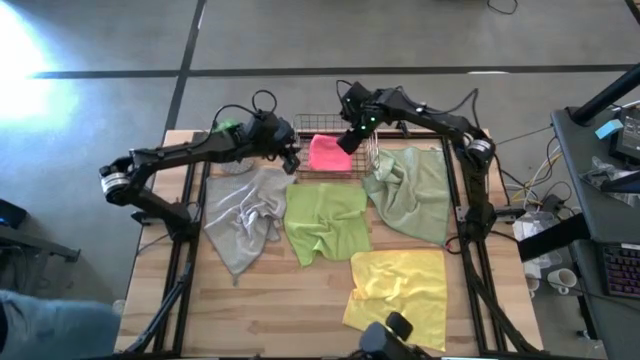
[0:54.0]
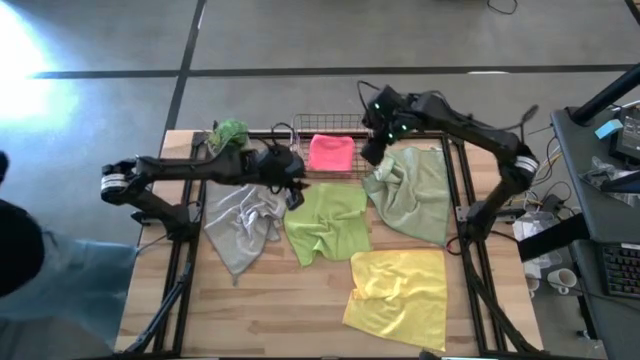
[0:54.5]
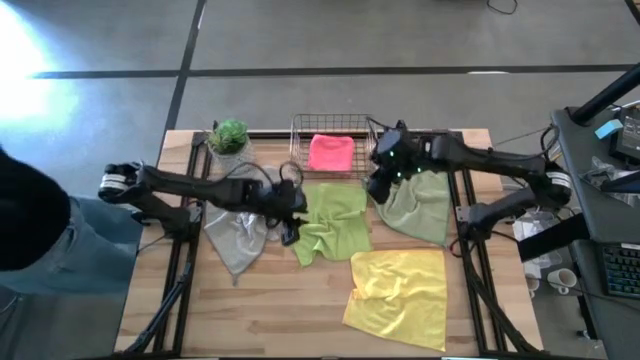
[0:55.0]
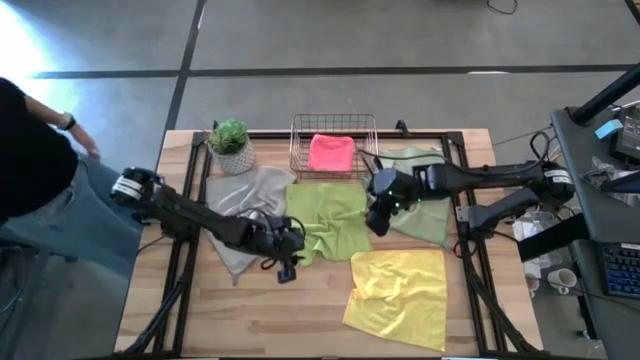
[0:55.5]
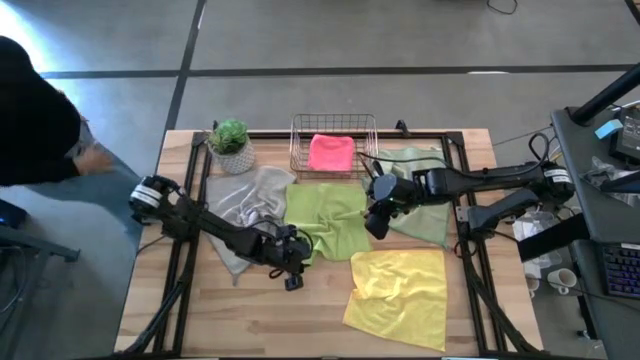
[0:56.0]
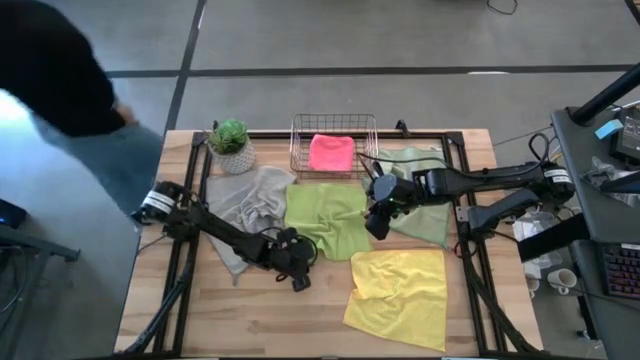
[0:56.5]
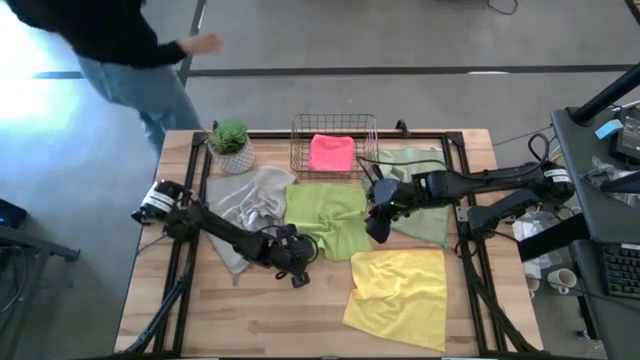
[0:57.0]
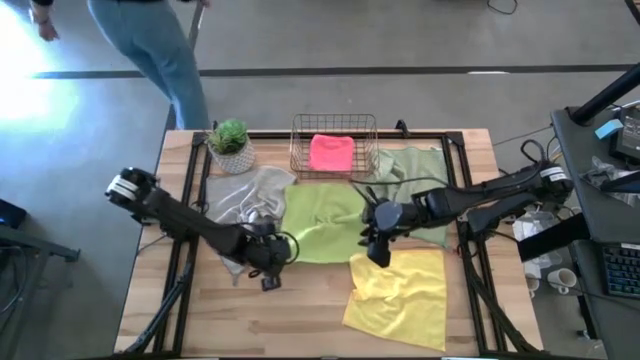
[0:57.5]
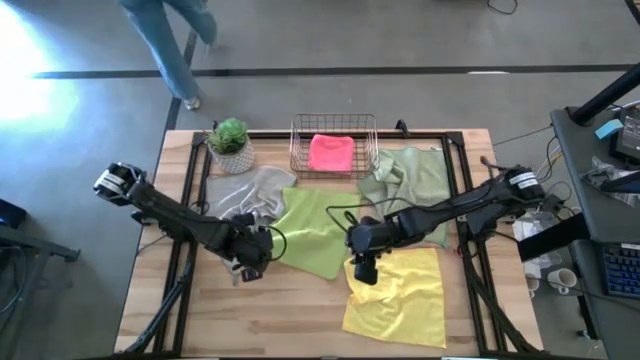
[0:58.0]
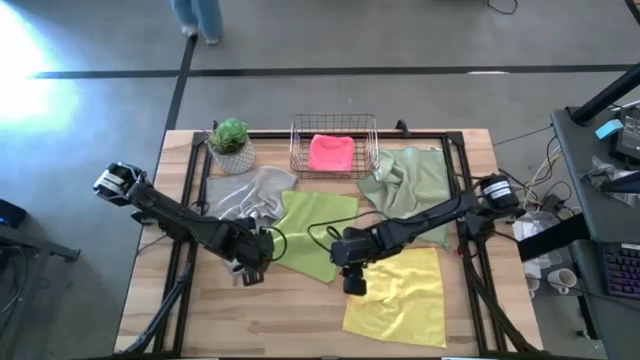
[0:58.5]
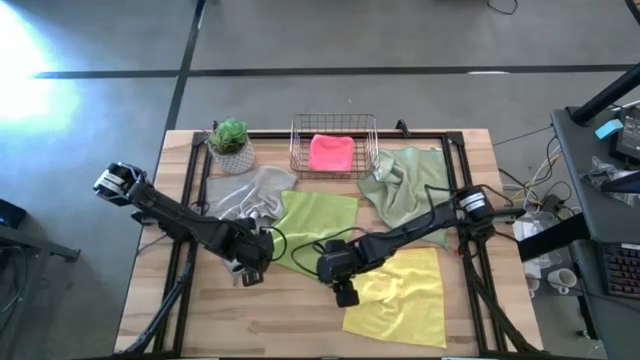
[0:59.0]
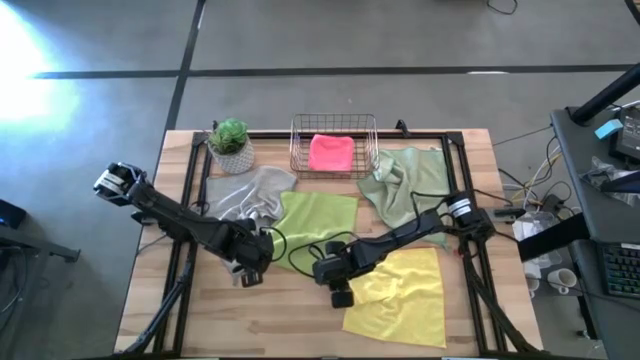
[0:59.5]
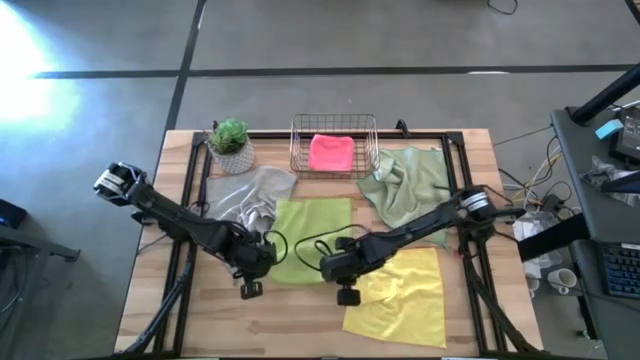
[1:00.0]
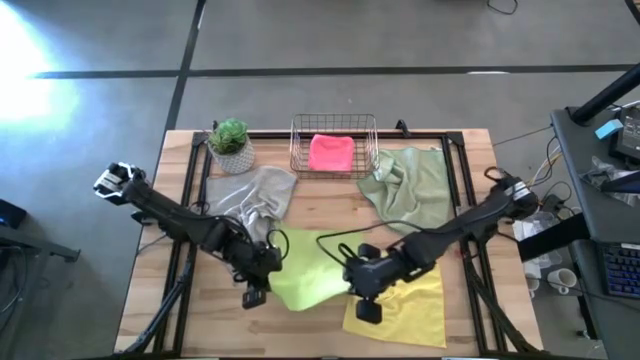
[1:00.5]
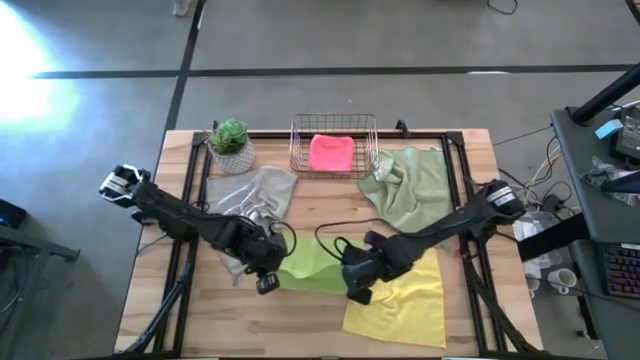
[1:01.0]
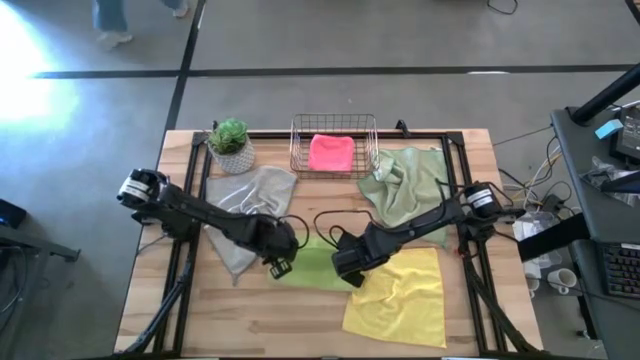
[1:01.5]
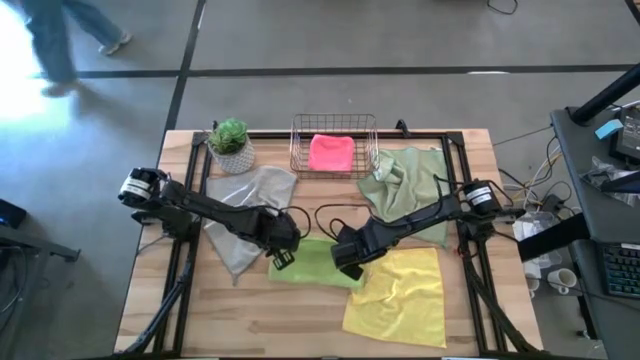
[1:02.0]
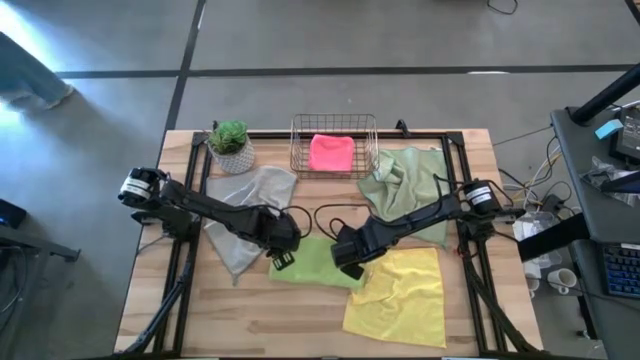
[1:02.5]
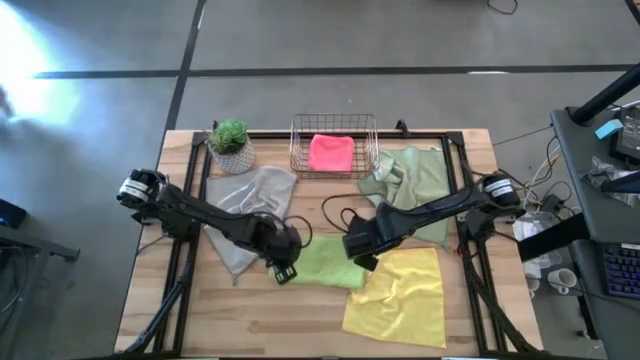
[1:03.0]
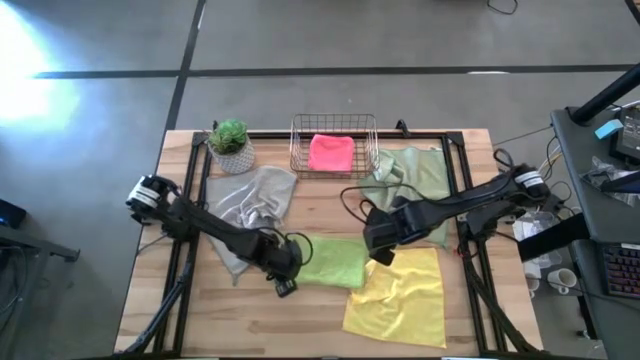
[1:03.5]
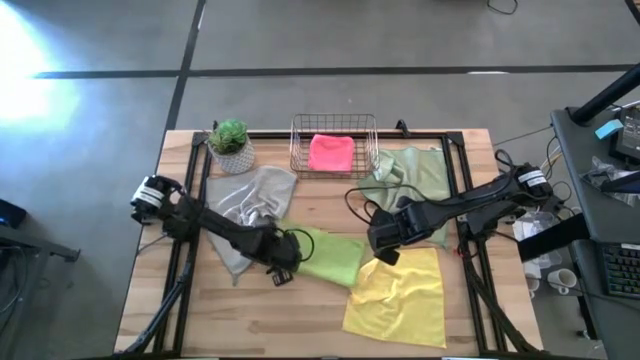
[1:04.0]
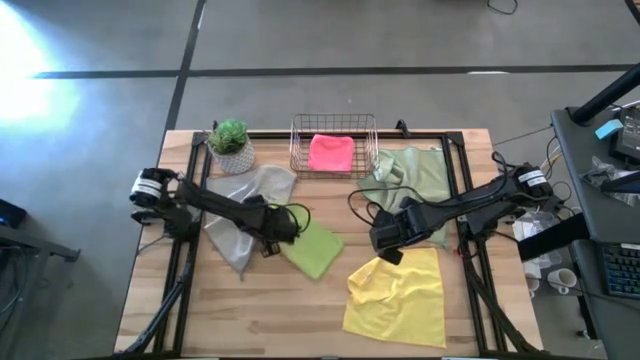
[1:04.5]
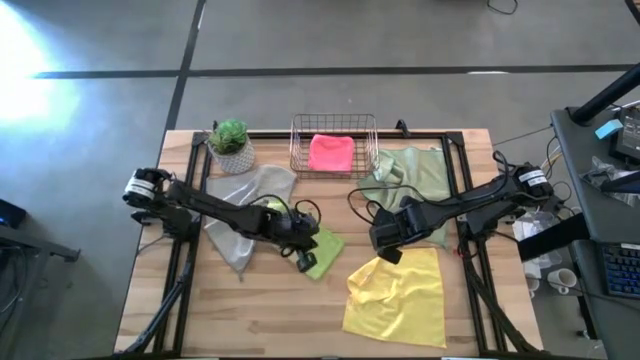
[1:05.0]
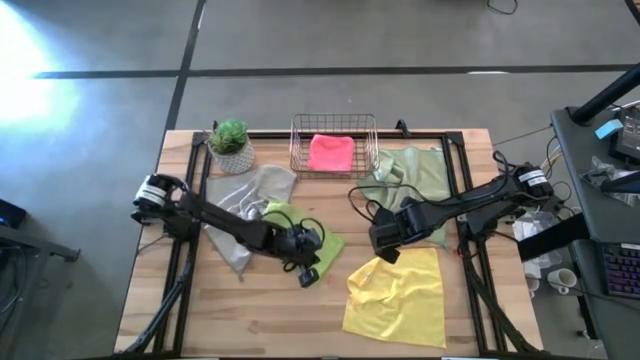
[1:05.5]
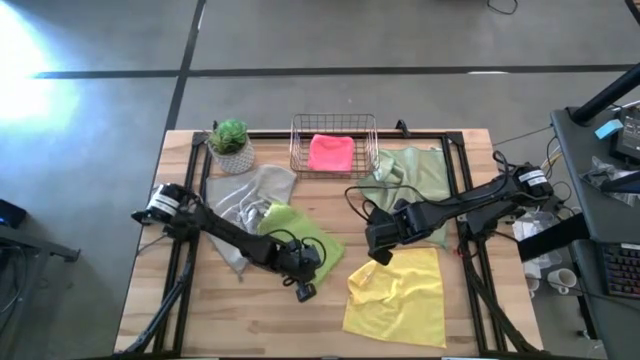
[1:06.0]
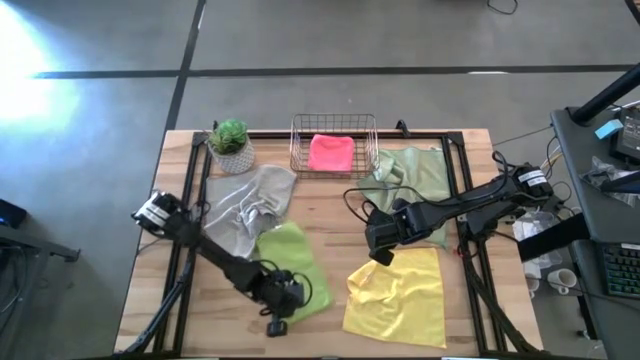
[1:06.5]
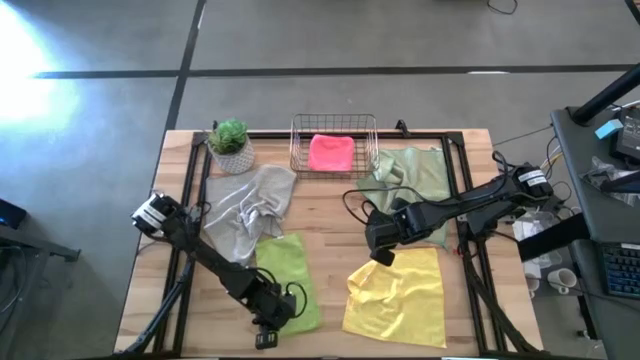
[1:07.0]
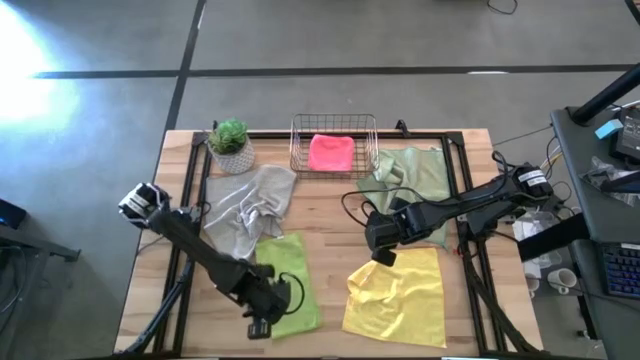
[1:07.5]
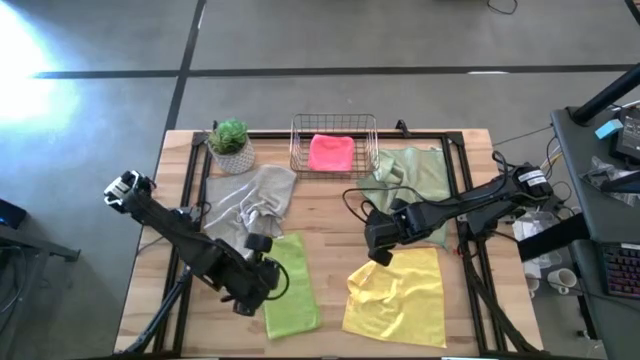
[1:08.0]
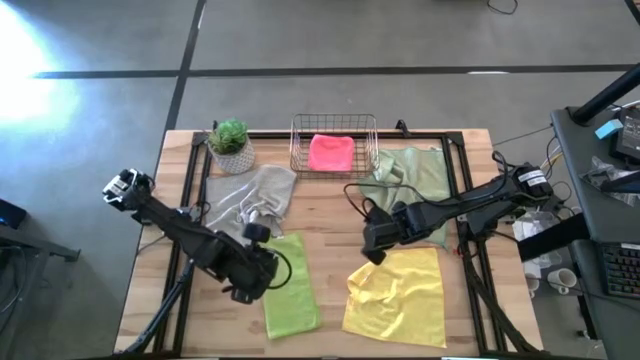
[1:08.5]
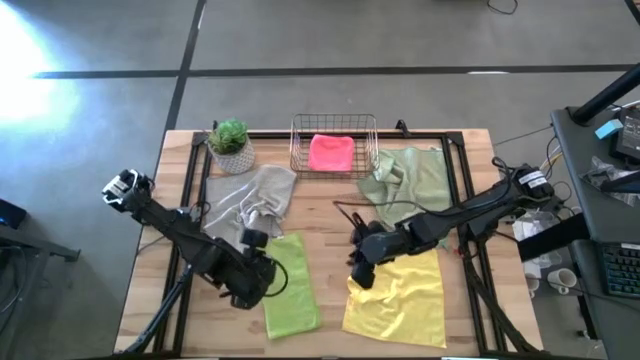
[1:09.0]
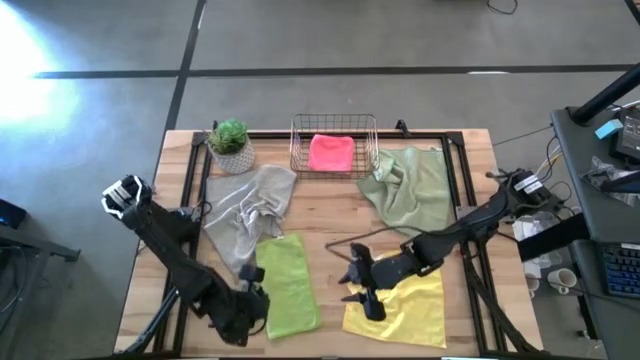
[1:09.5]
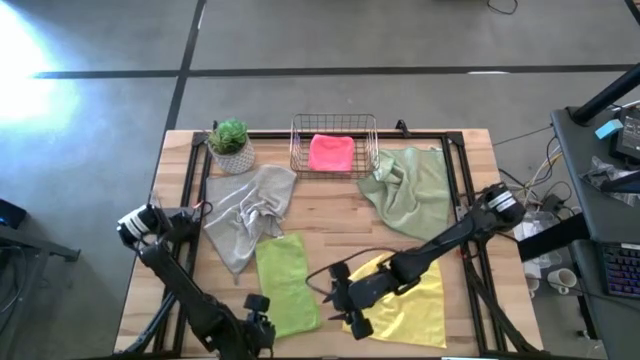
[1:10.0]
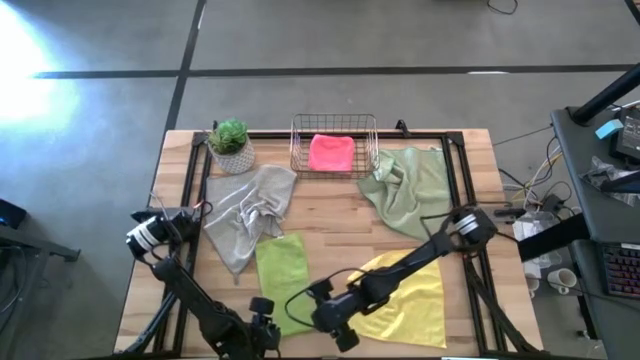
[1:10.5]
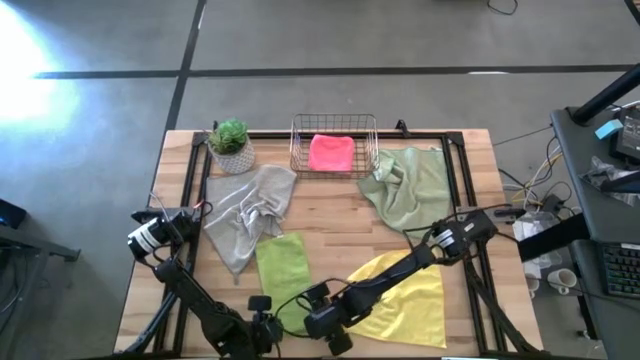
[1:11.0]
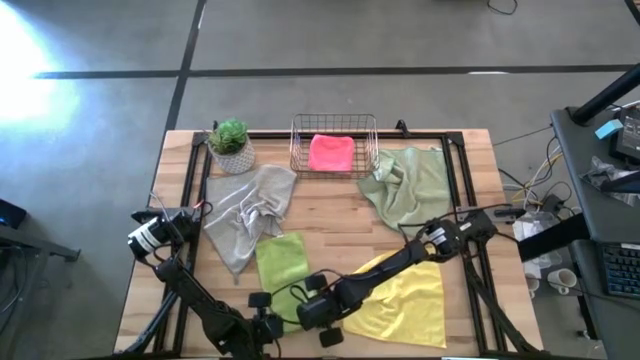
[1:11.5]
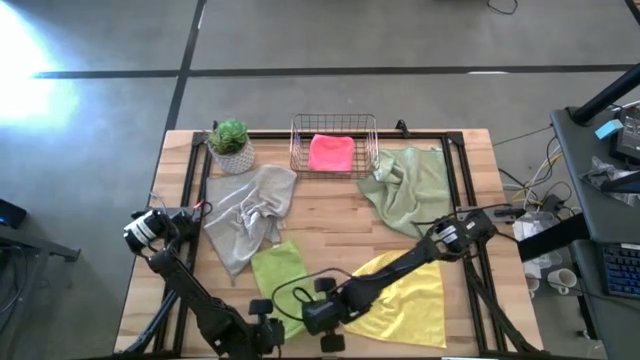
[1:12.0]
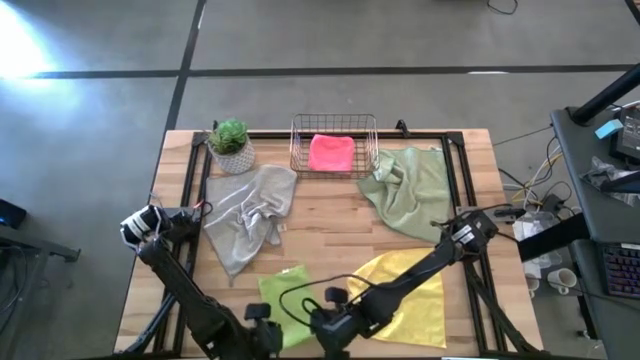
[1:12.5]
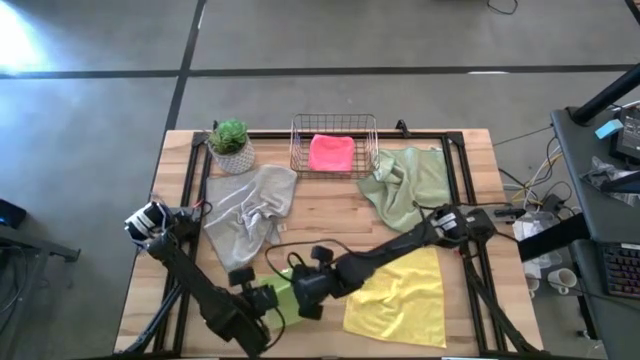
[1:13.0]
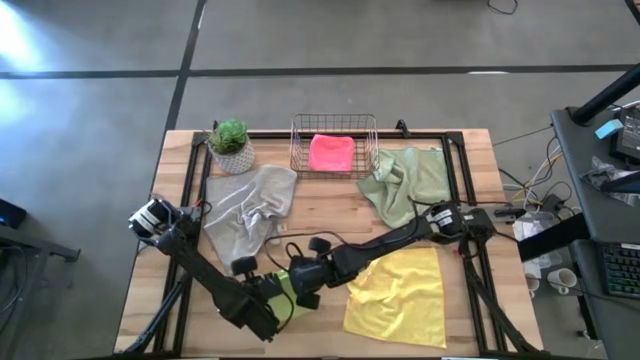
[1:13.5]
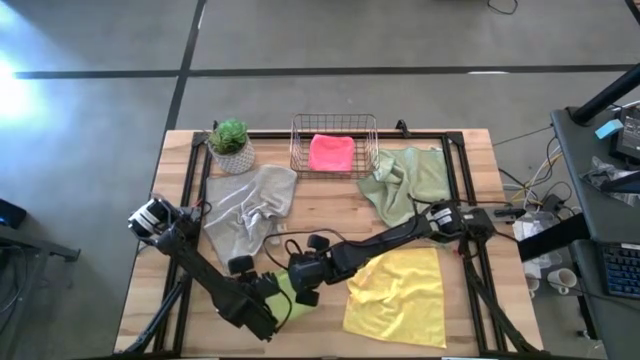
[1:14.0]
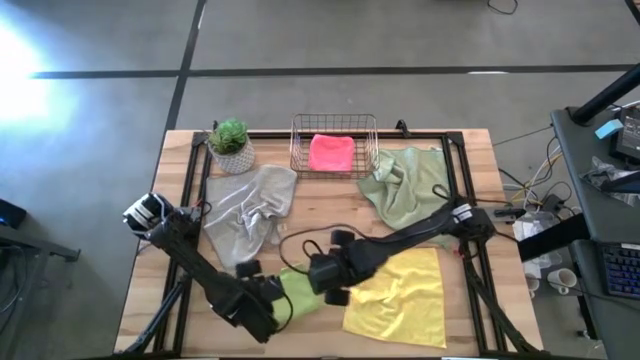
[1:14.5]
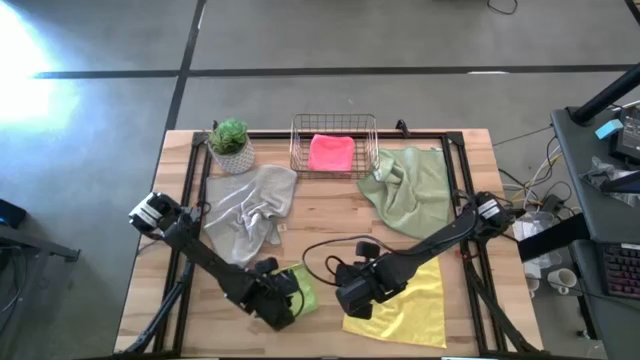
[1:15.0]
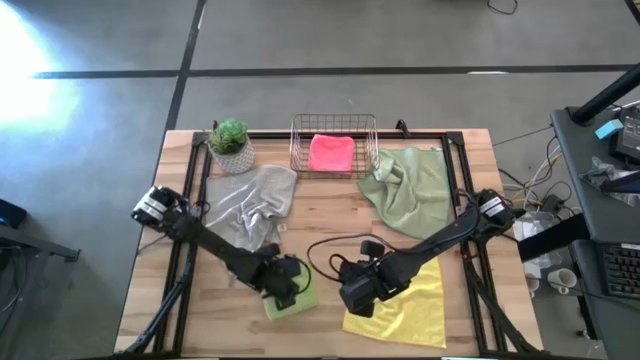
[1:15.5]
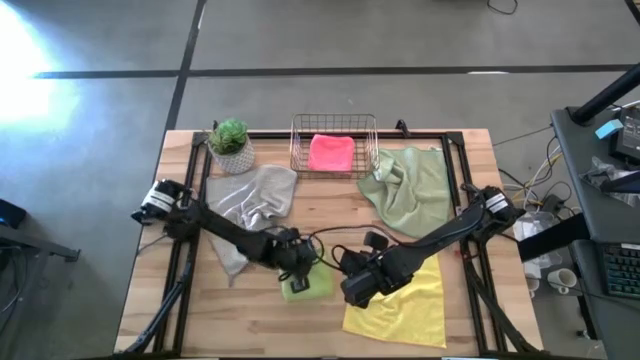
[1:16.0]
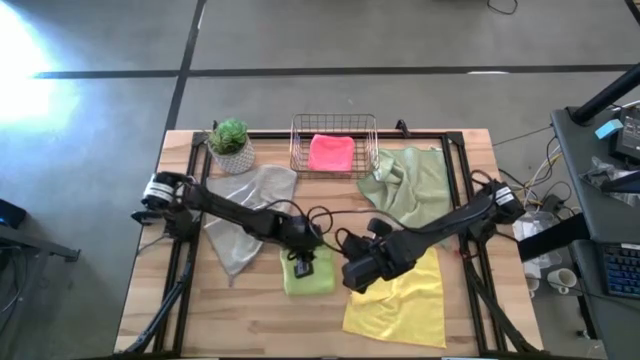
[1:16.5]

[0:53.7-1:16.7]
Task: Fold microfiber towels
Fold the light green towel
